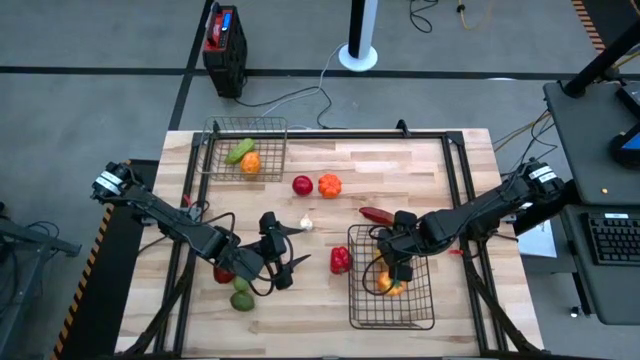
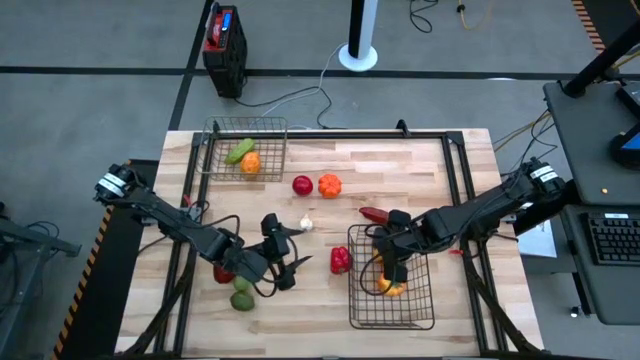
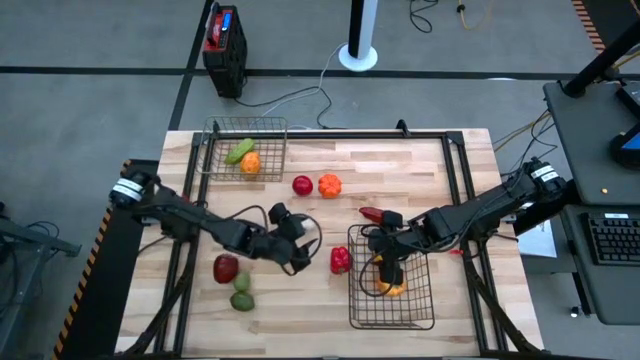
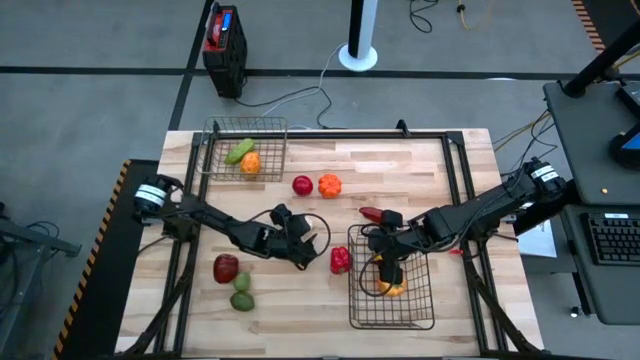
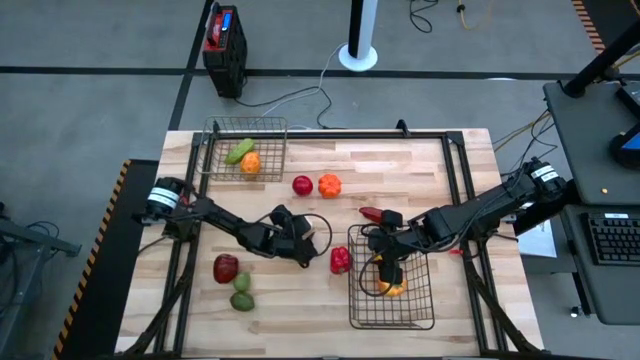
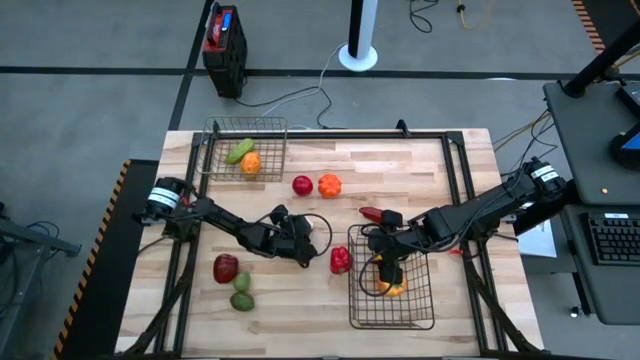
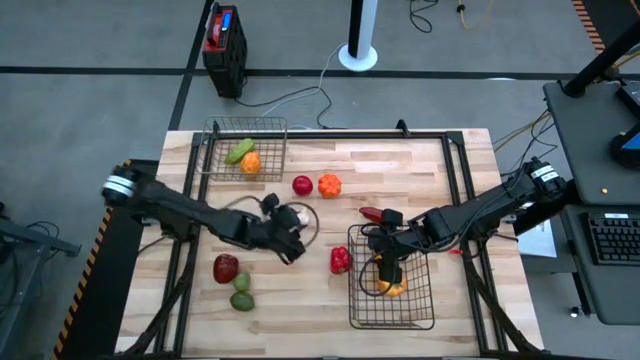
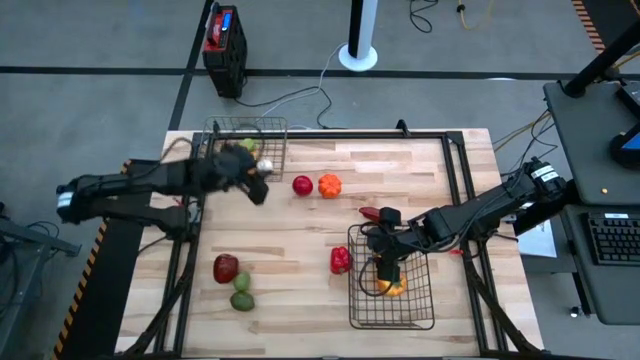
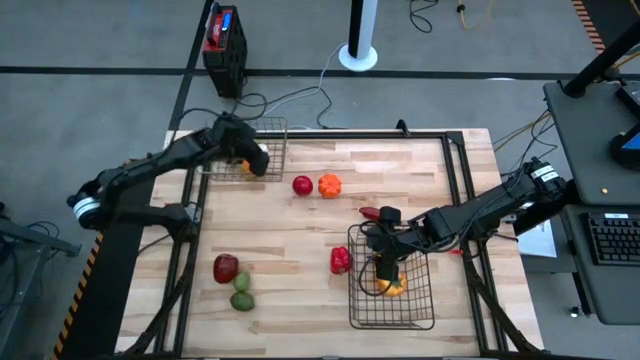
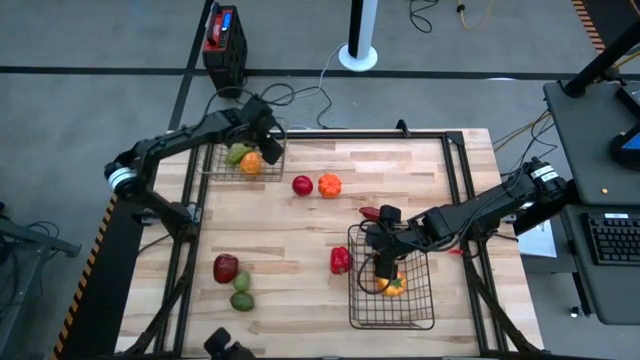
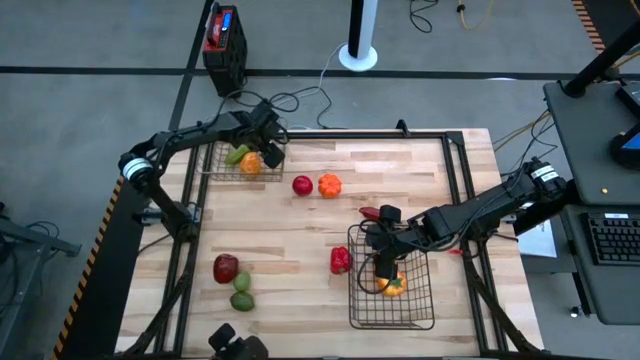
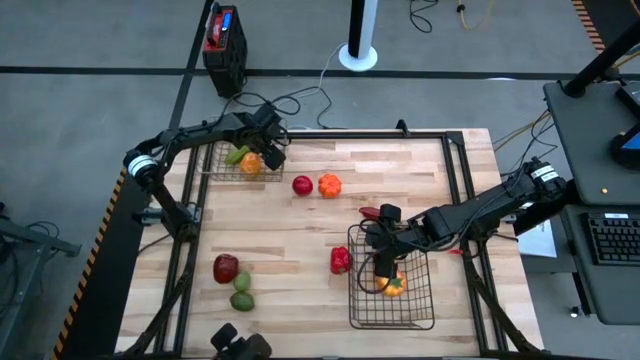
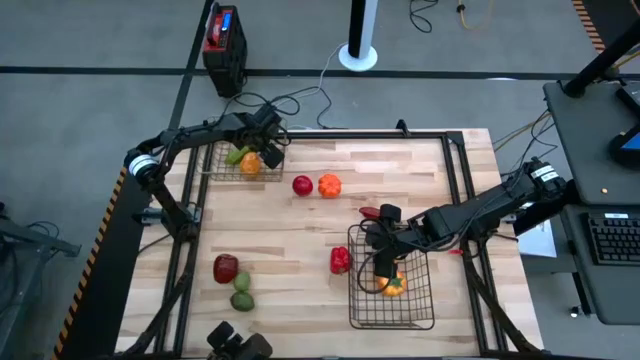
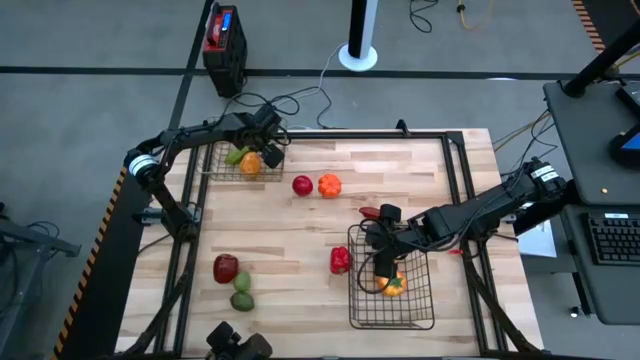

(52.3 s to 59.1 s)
Task: Sort produce into baskets
Put the white garlic into the gold wire basket

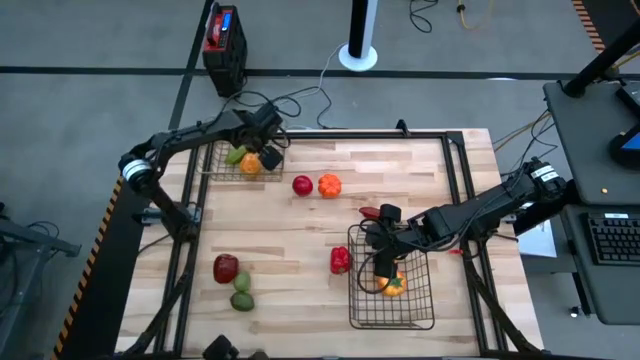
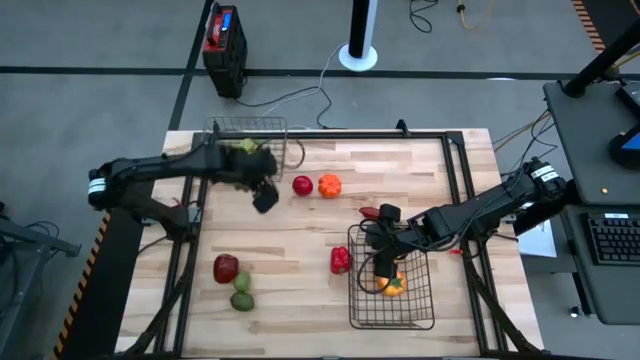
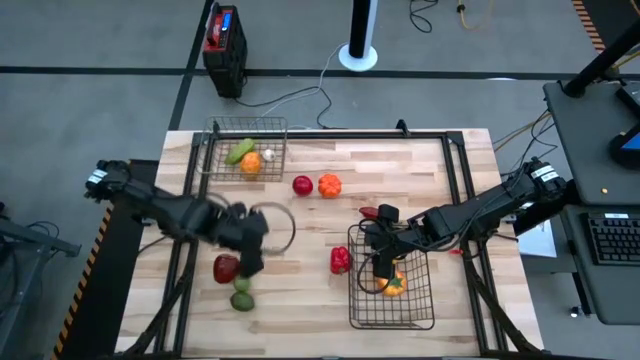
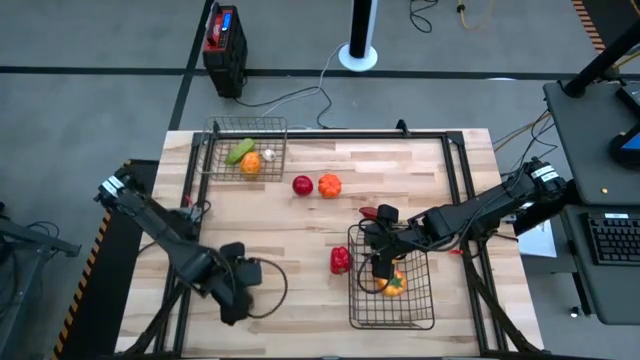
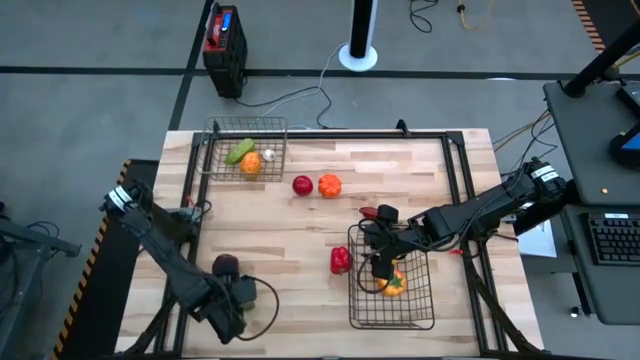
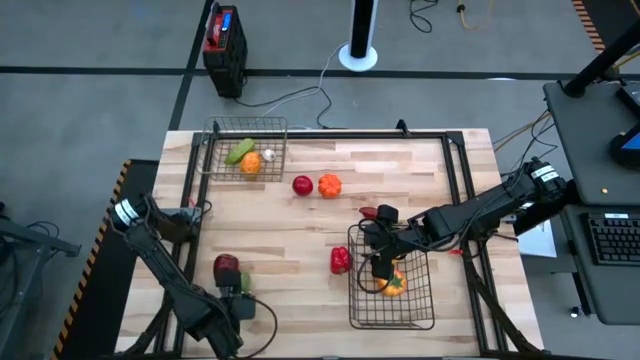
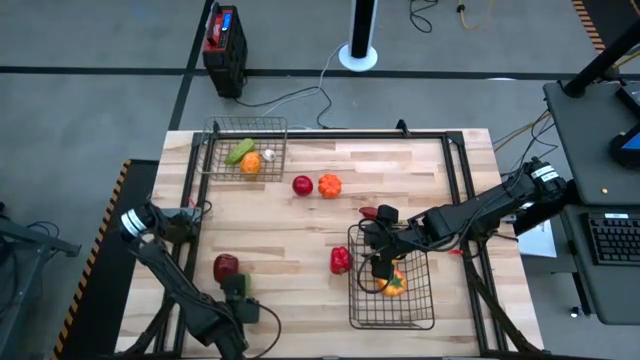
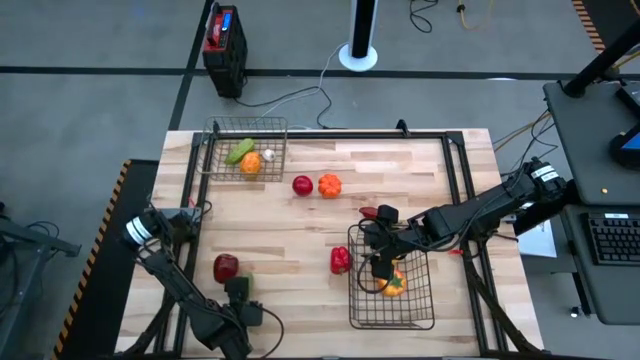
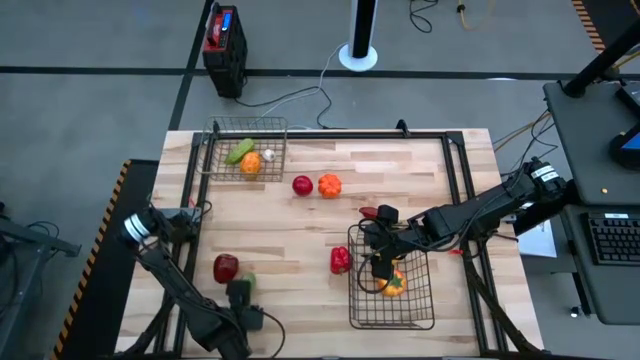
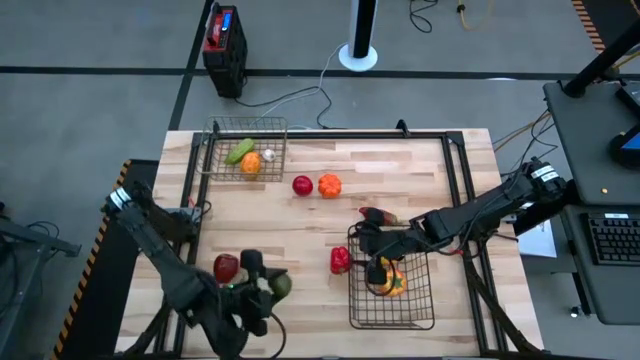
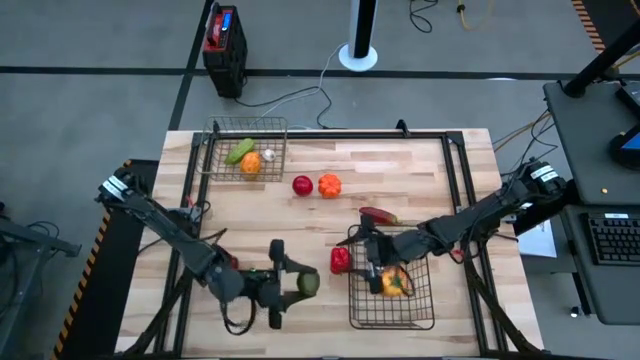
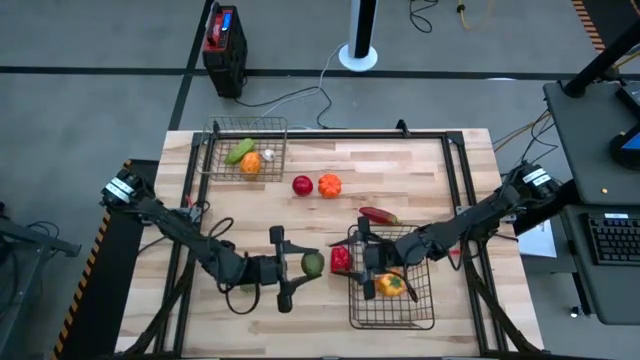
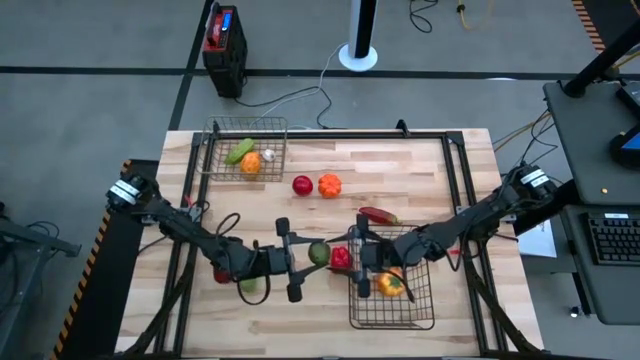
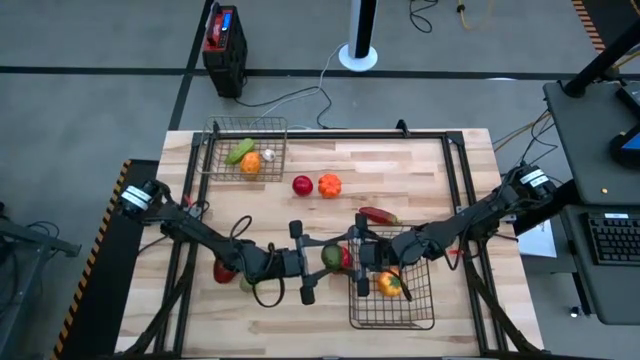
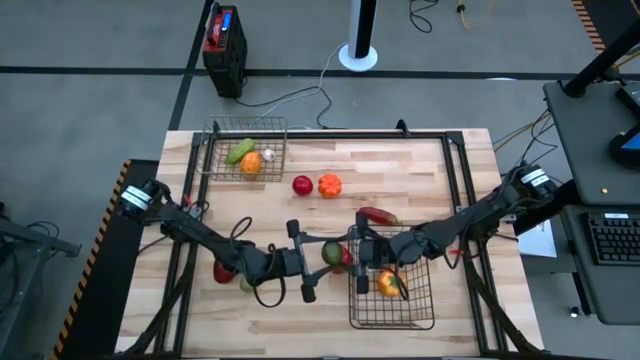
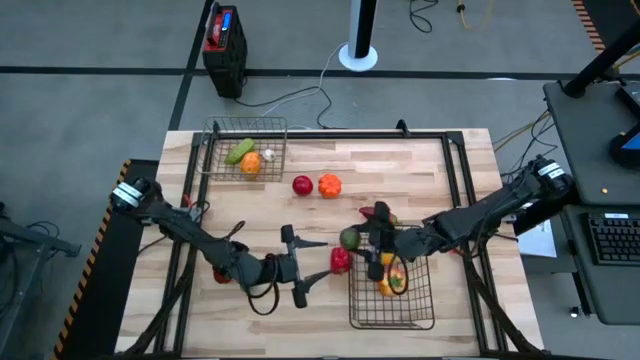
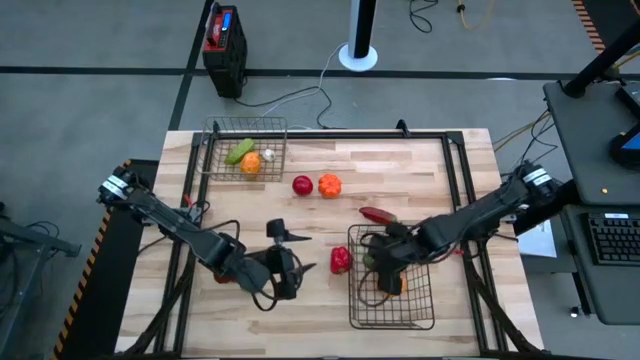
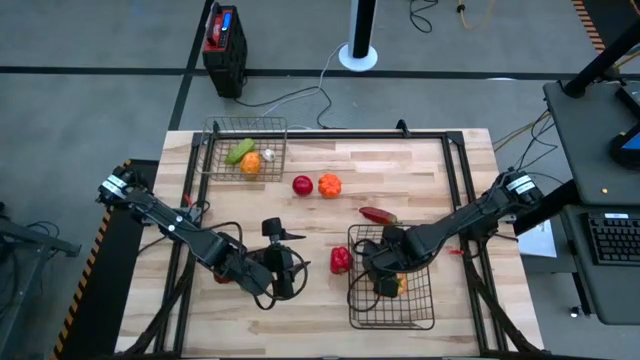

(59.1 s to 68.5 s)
Put the bottom green lime into the black wire basket

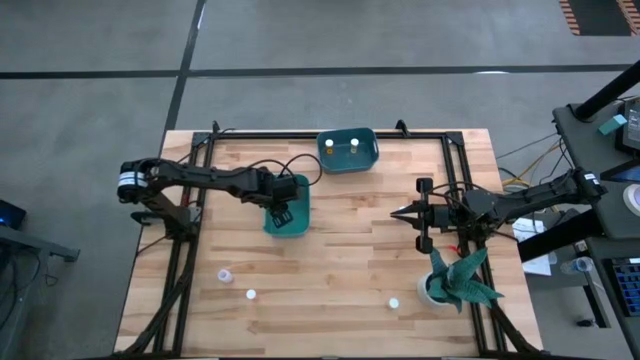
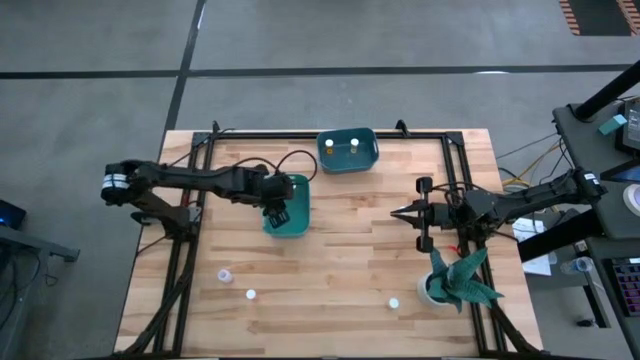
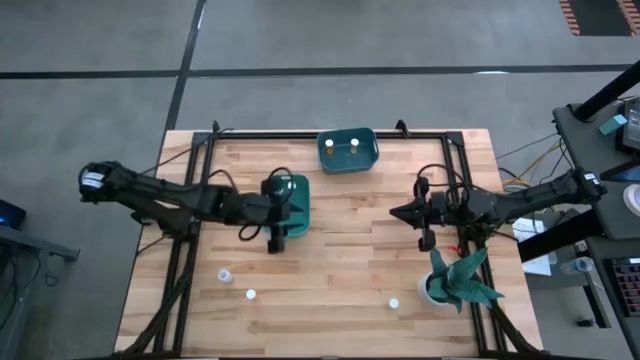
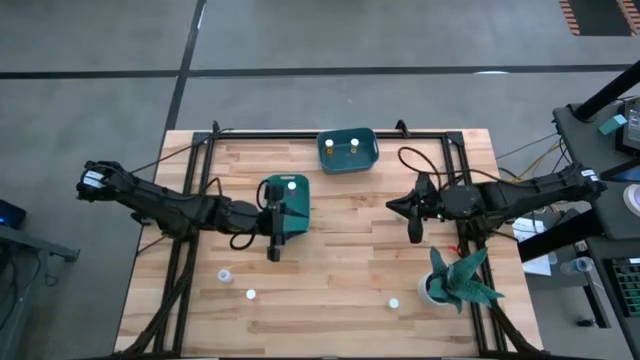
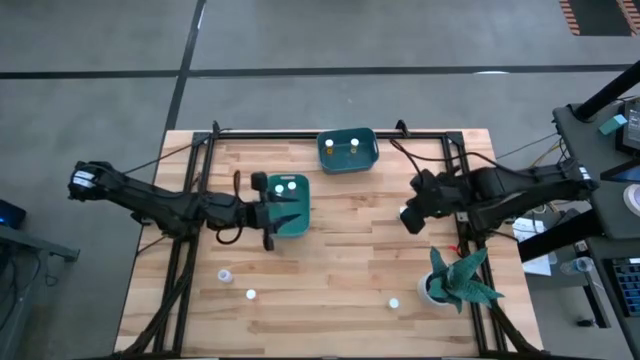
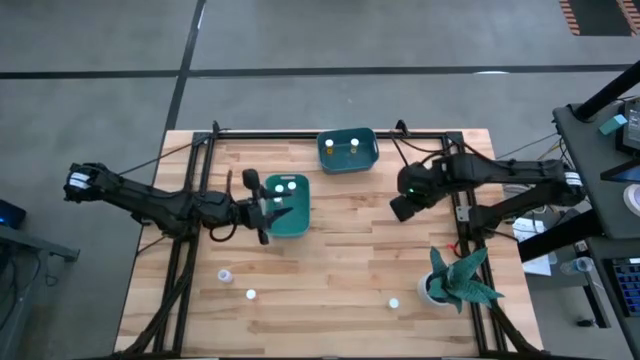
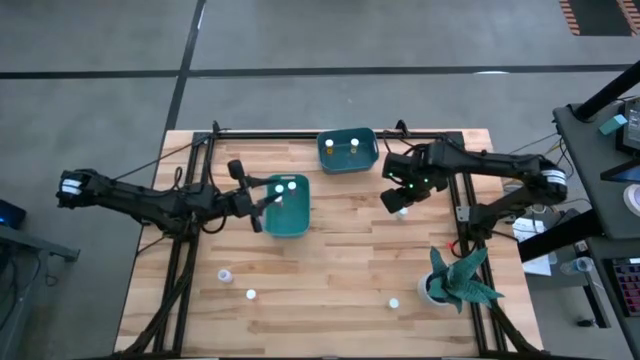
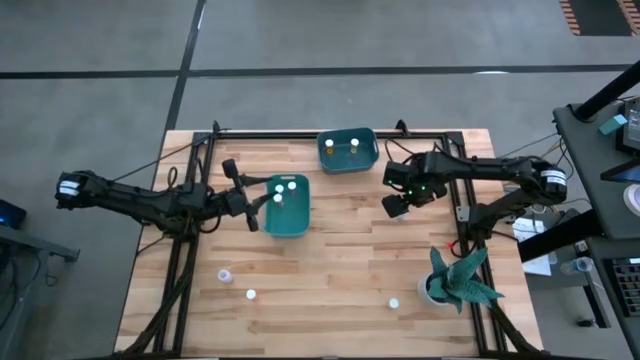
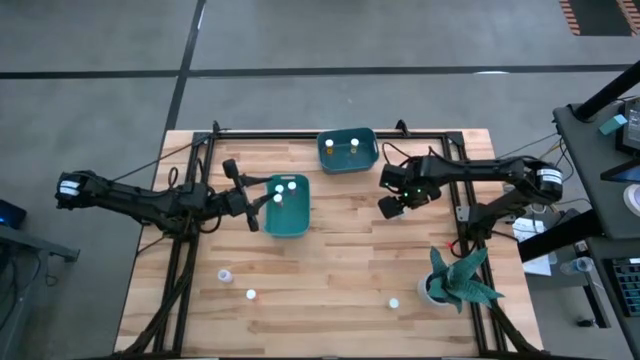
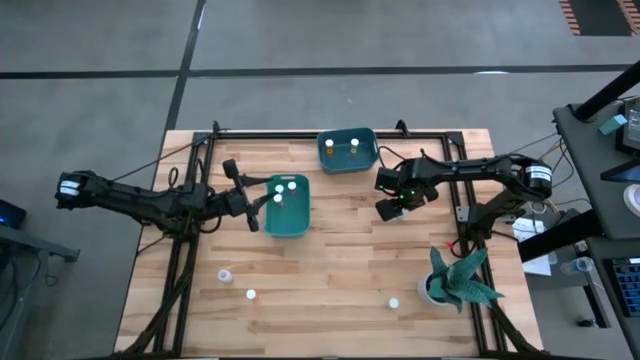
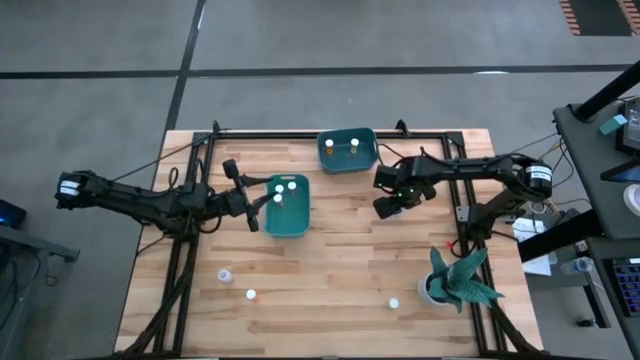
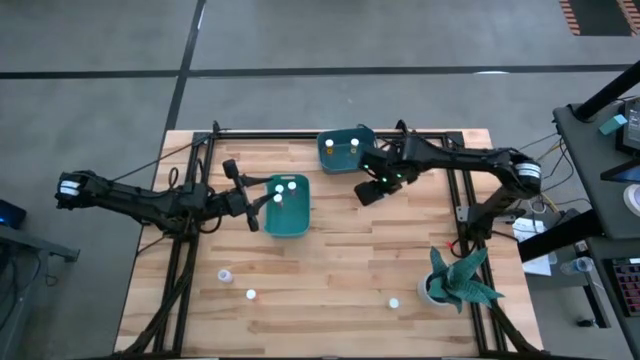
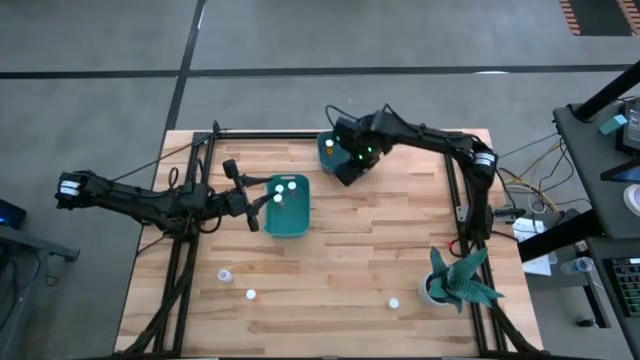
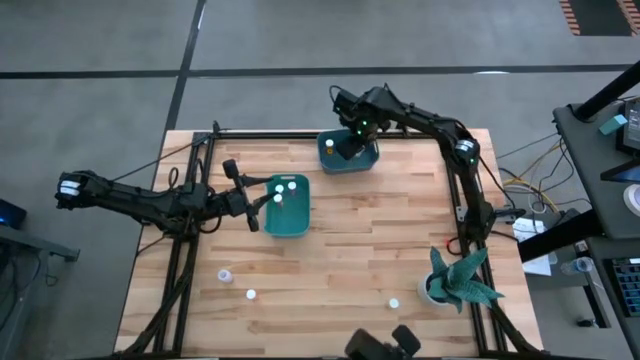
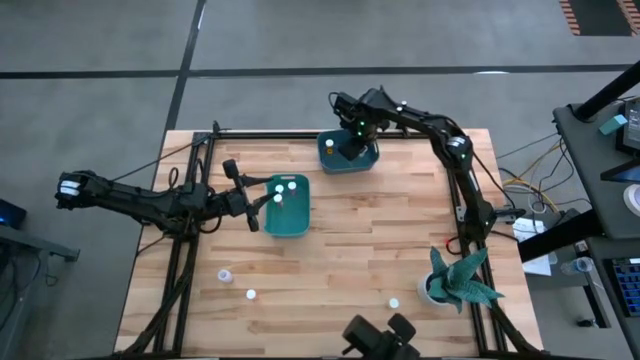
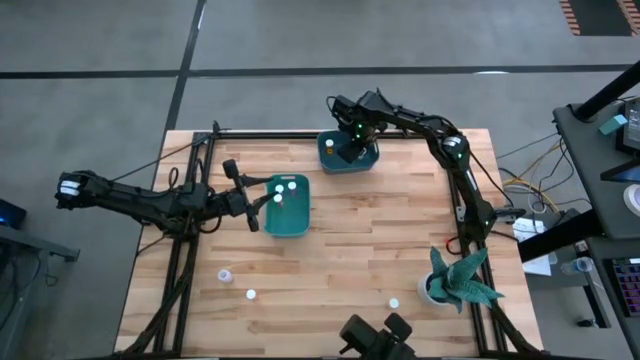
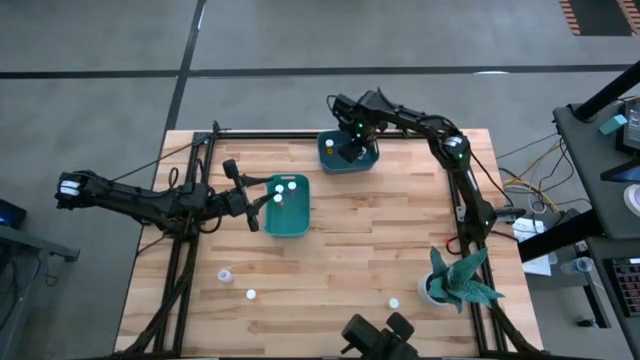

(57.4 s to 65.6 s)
Task: Pick and place medicine bottles into bin by pill shape (circle, oval)
Put the blue tablet pill bottle into the blue bin
